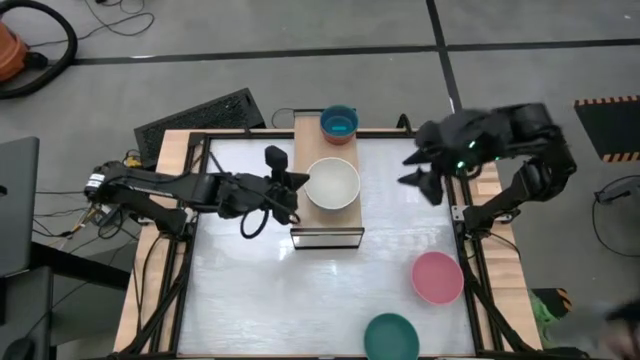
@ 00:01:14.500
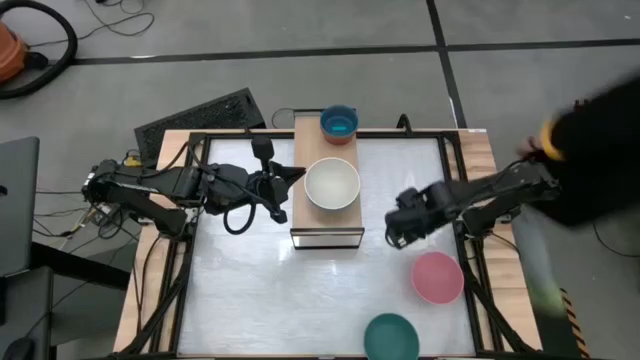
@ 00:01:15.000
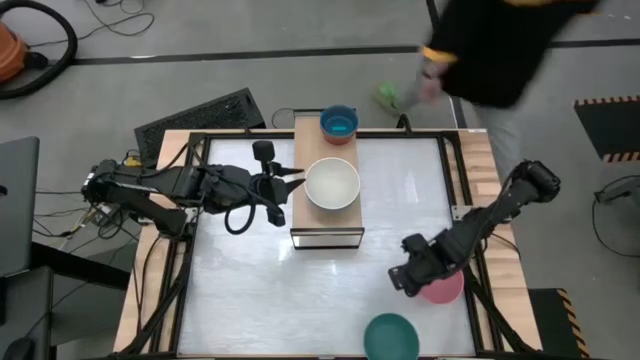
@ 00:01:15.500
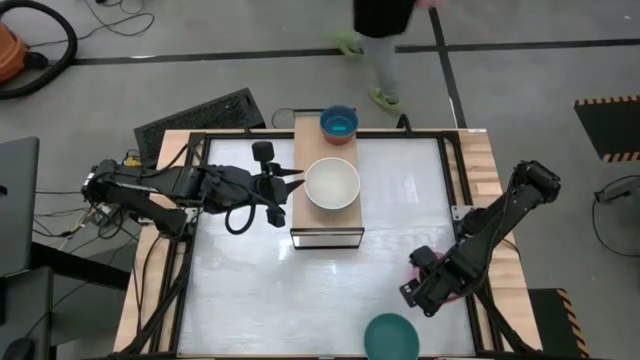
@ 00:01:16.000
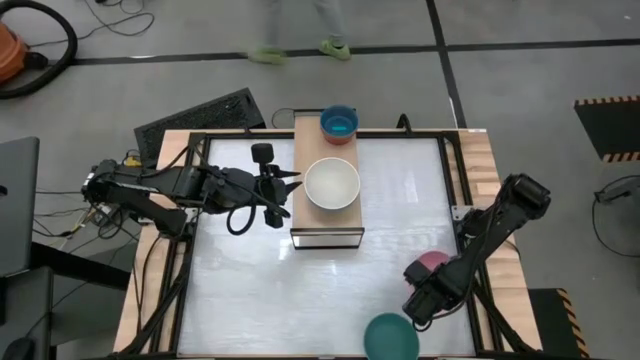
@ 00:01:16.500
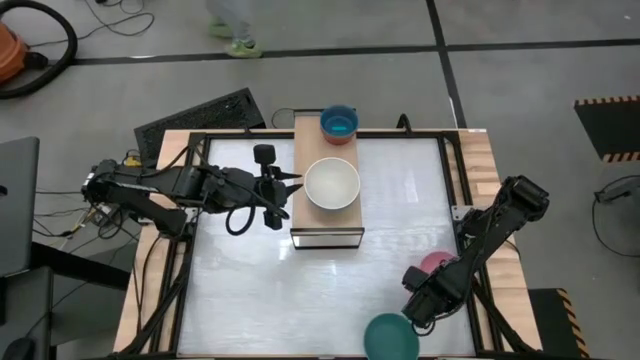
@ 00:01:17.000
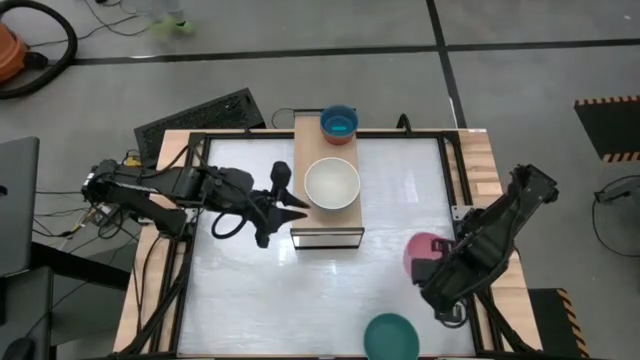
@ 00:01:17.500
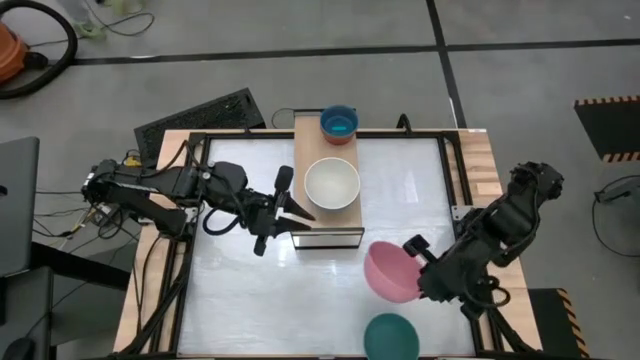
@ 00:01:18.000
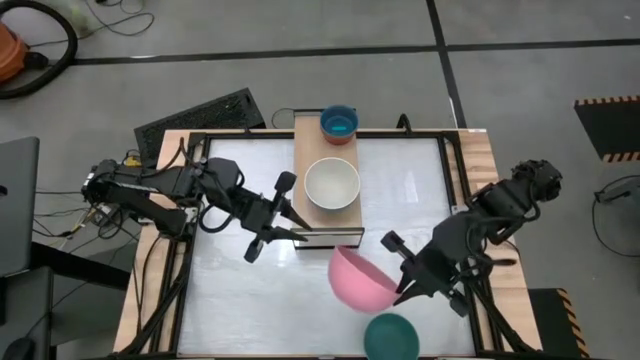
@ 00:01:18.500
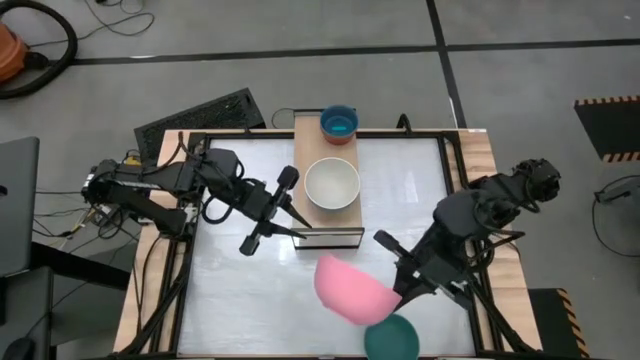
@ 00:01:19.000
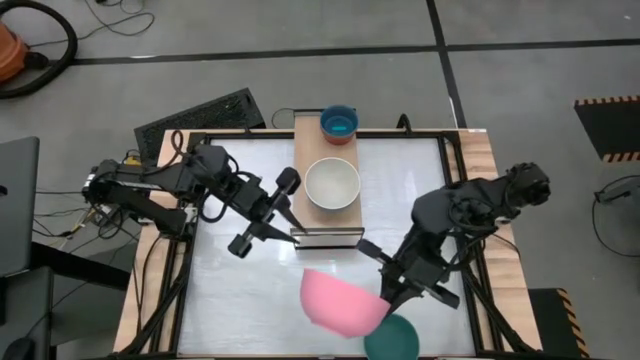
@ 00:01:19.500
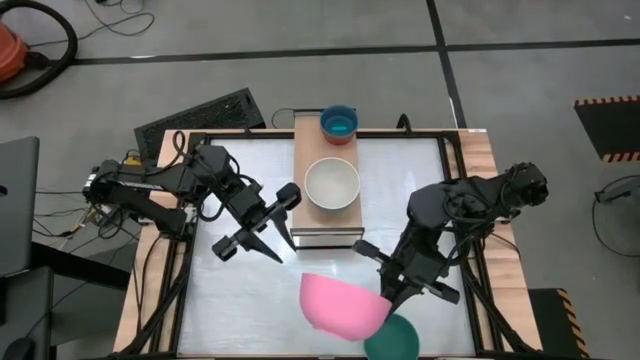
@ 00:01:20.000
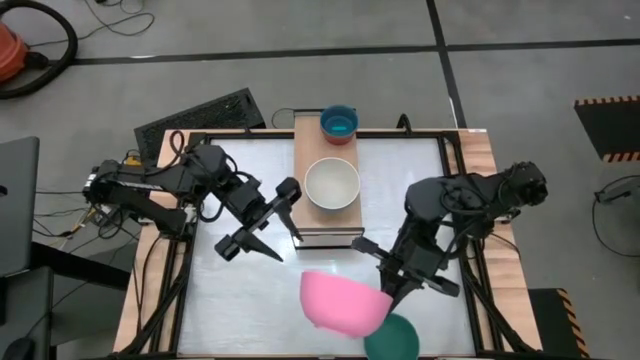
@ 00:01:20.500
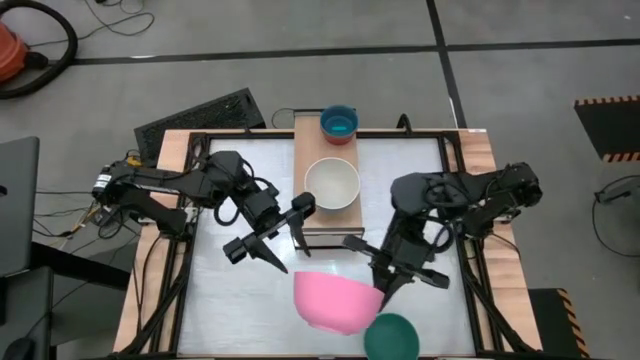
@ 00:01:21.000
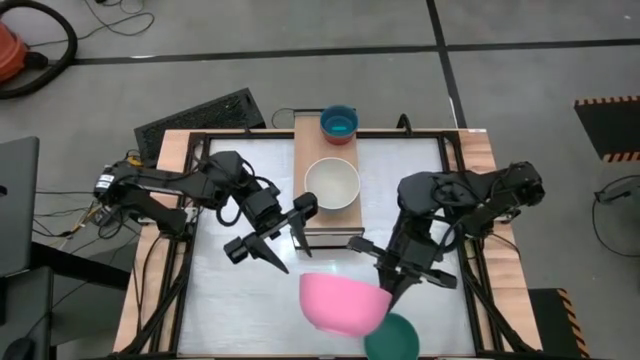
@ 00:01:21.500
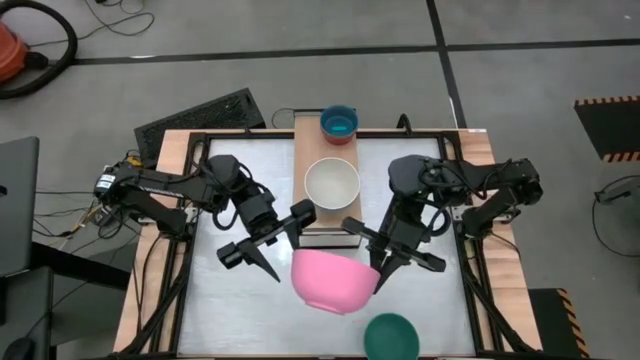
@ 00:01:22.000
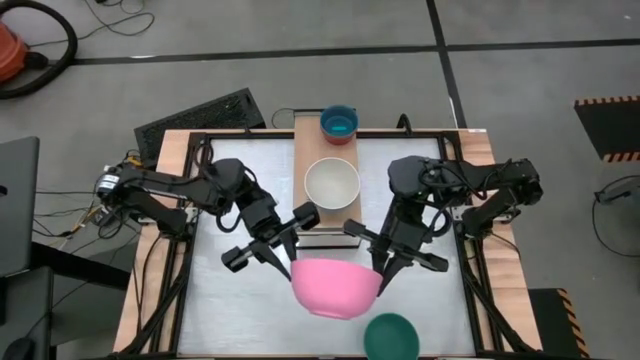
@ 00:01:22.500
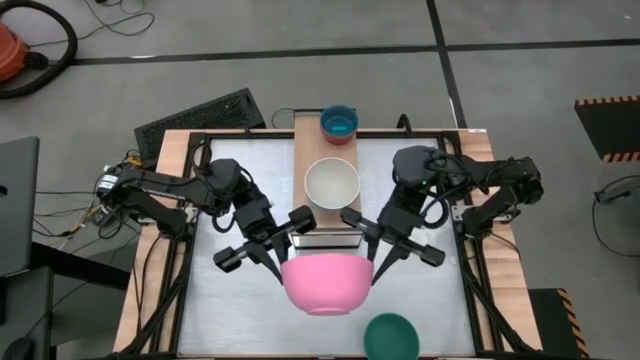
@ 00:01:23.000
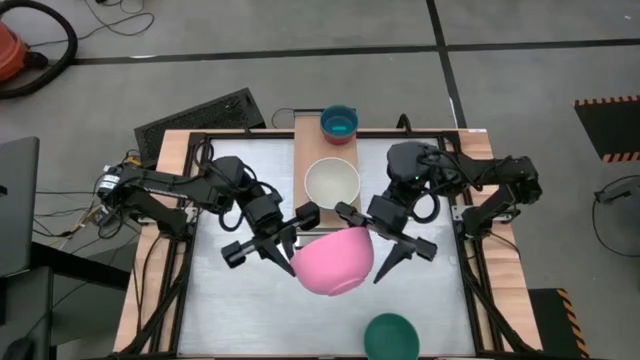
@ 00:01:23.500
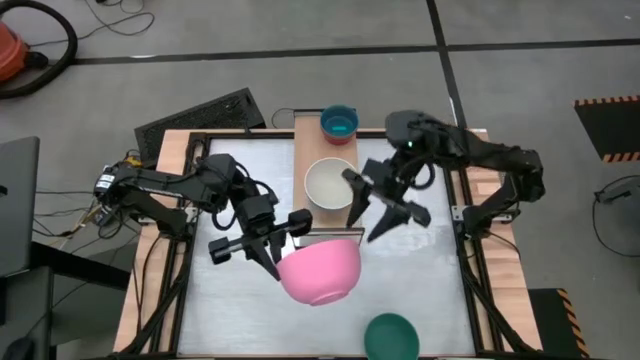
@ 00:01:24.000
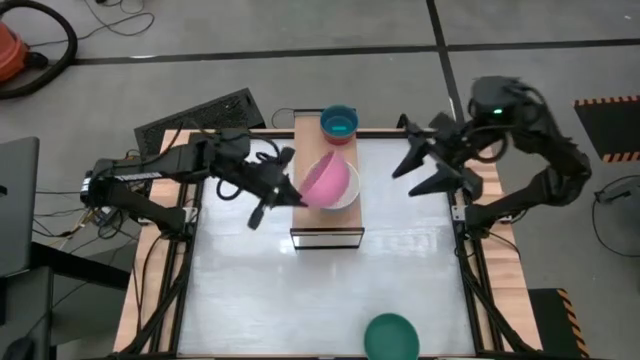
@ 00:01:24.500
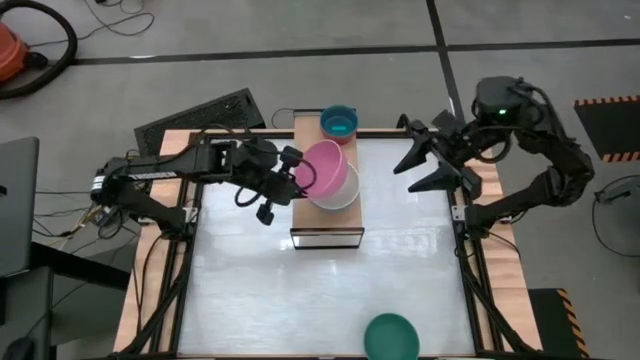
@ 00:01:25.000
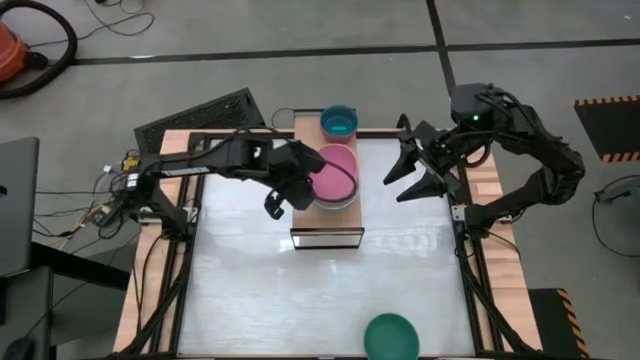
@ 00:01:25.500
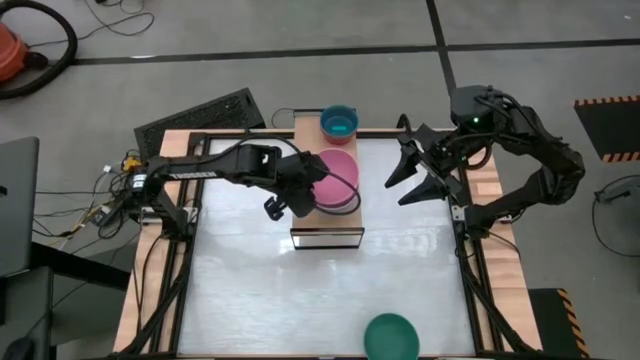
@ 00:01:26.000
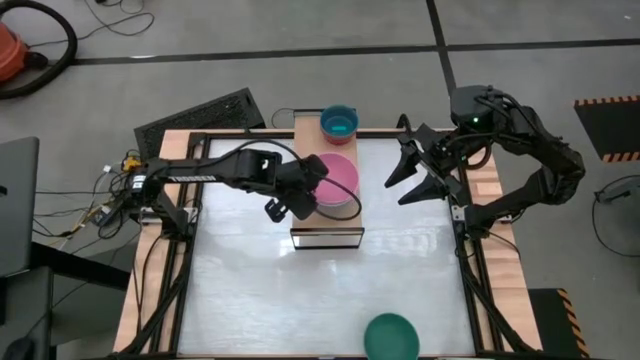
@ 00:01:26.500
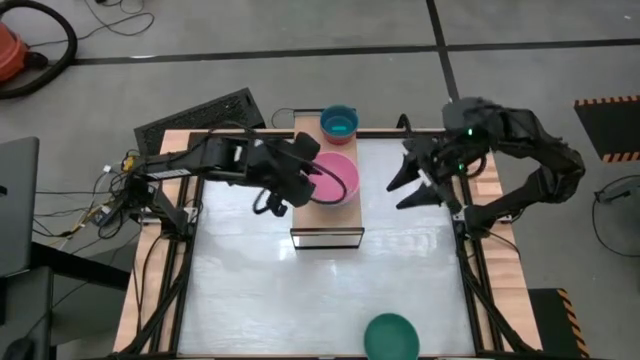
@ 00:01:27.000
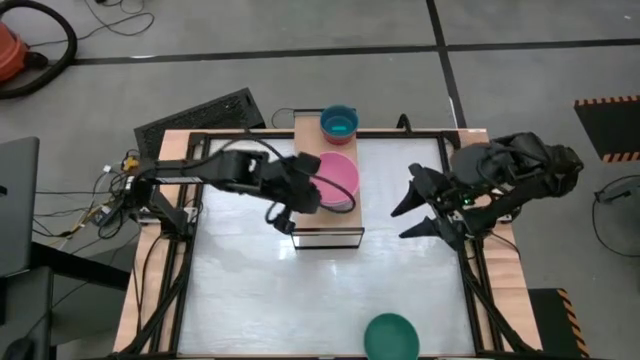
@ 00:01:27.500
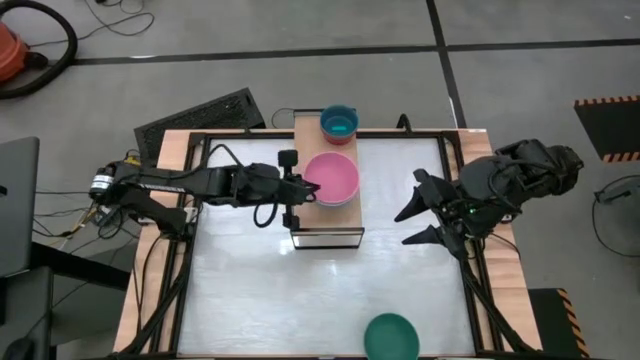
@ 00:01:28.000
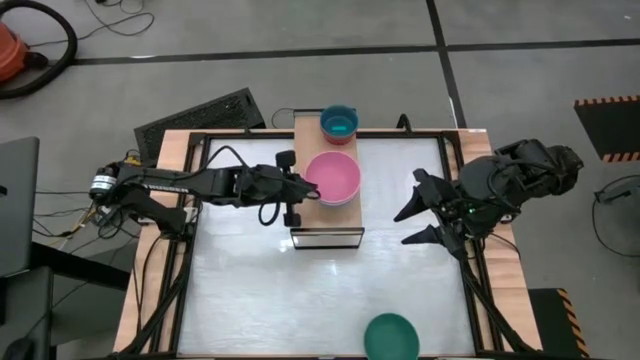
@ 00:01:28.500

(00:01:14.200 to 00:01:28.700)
Task: Place and stack bowls onto a shelf
Stack the light pink bowl on top of the white bowl on the shelf

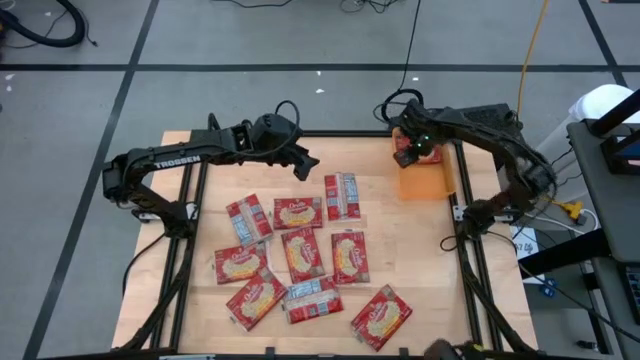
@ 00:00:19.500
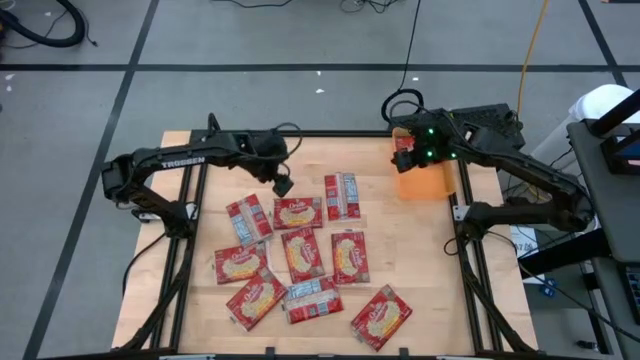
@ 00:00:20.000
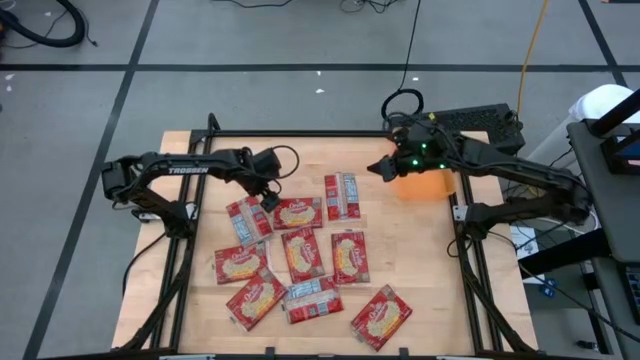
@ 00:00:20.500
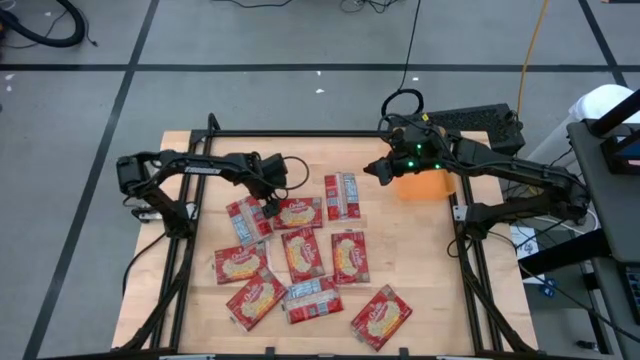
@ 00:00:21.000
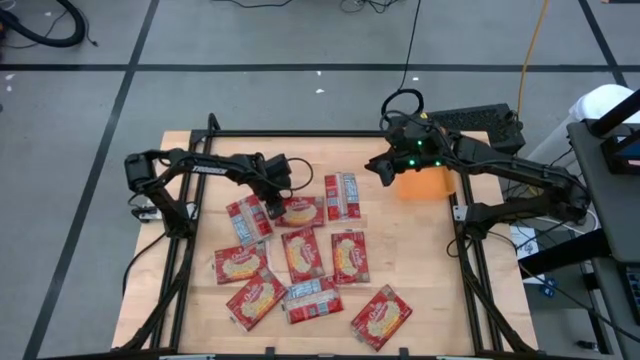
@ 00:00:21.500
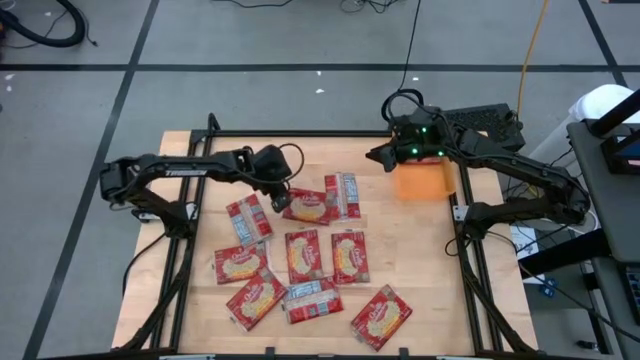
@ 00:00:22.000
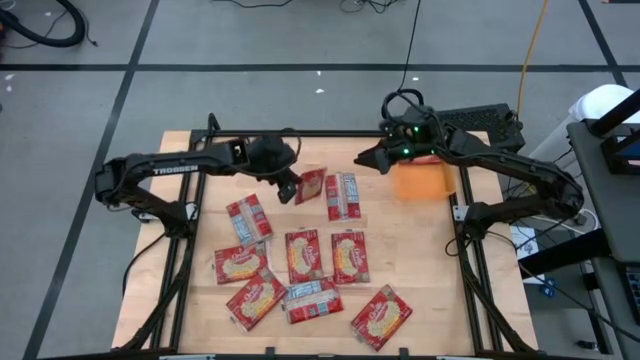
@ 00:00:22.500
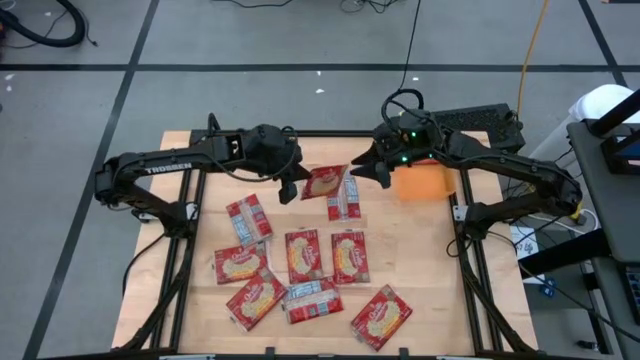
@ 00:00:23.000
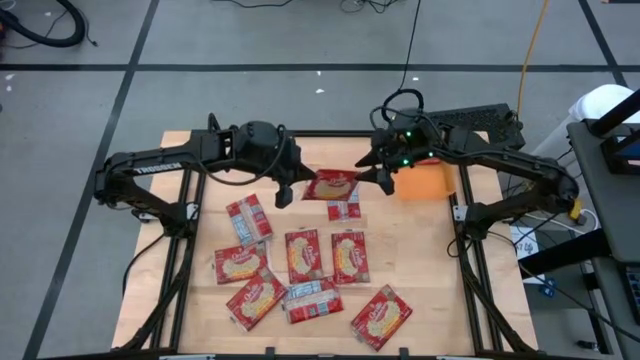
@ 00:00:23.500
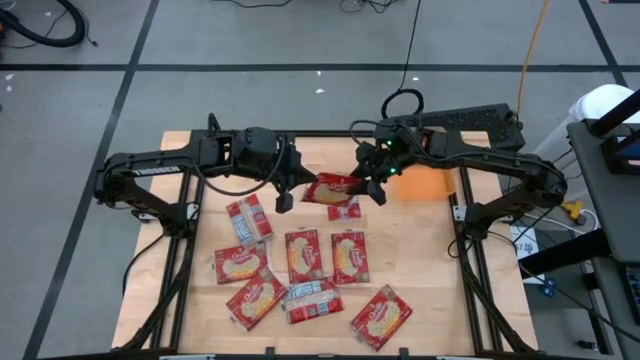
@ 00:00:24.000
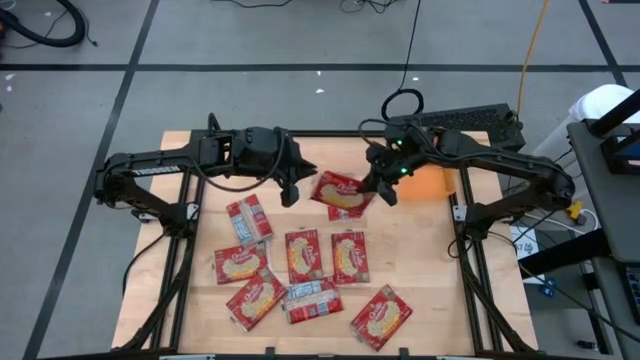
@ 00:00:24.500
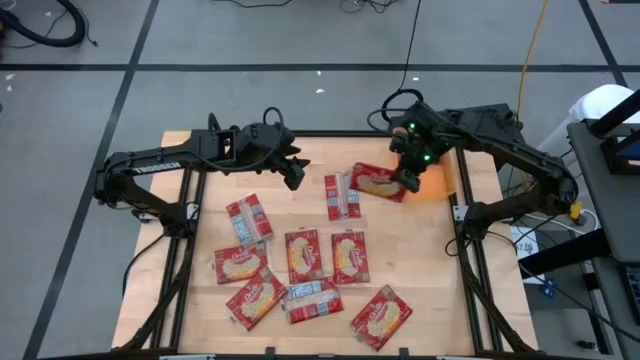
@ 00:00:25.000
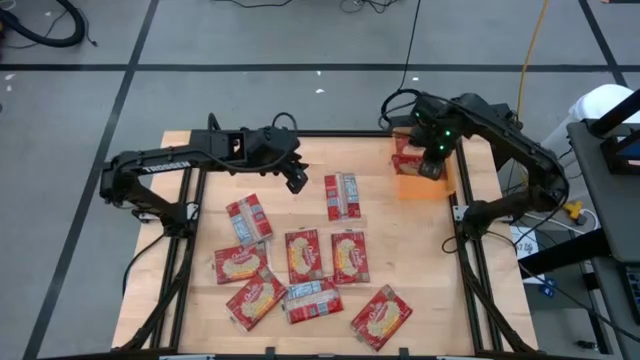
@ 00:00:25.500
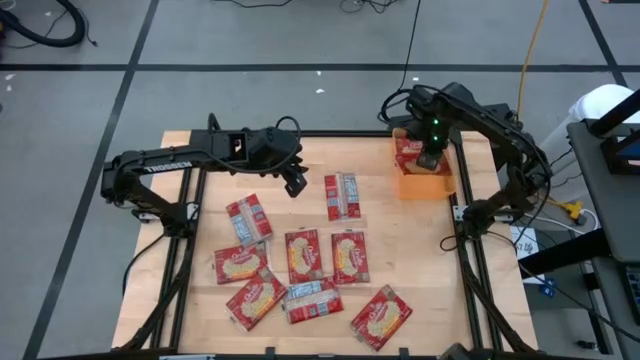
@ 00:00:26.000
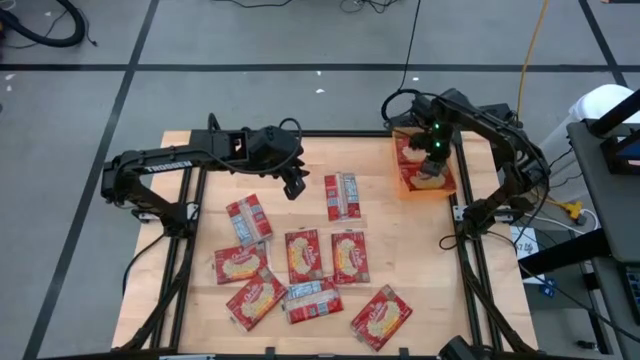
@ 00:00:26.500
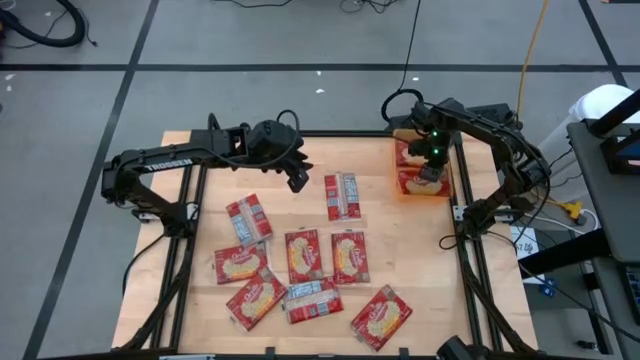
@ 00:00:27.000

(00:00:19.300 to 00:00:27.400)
Task: Sort popcorn bags into baskets
Put the red popcorn bag into the orange bin
